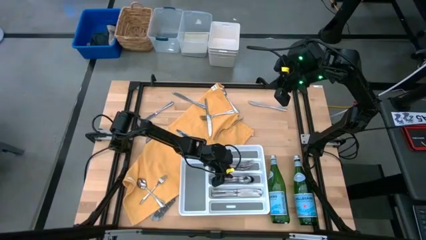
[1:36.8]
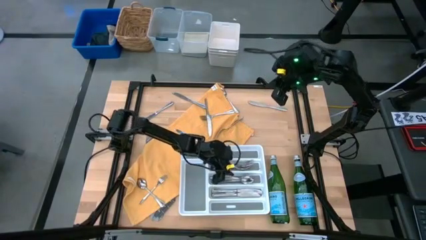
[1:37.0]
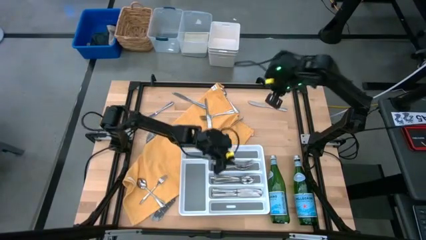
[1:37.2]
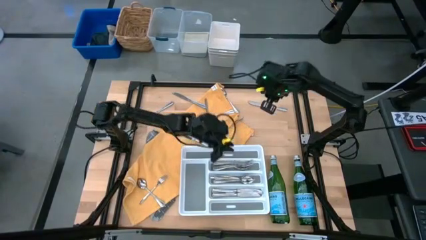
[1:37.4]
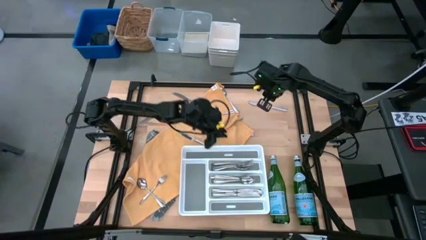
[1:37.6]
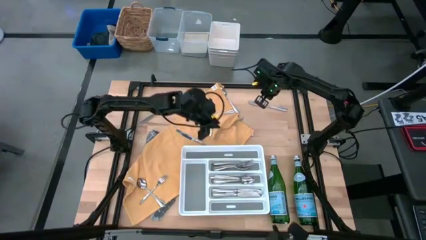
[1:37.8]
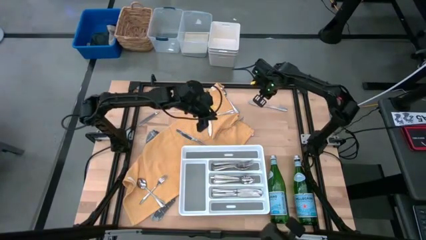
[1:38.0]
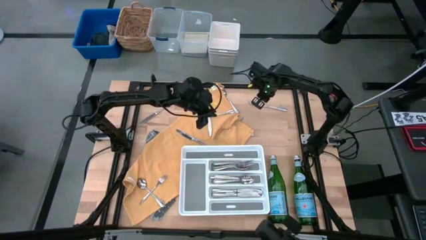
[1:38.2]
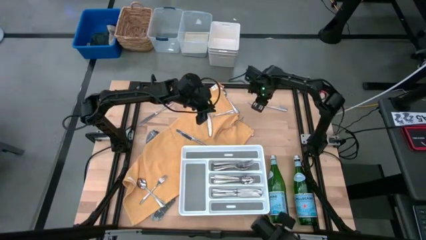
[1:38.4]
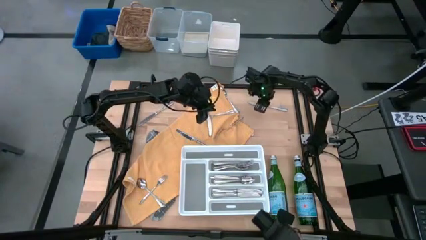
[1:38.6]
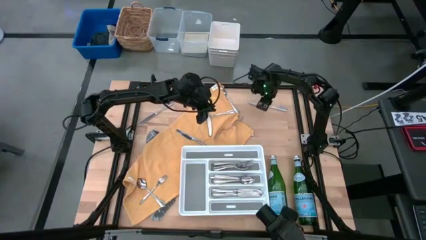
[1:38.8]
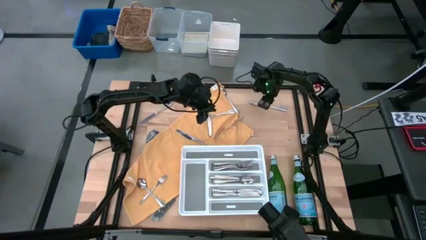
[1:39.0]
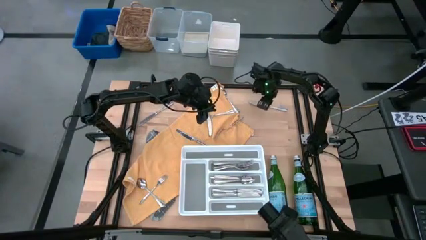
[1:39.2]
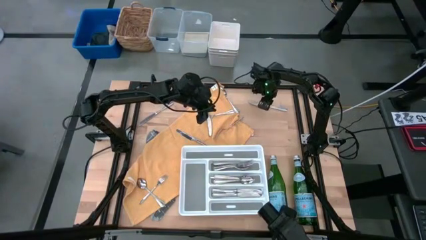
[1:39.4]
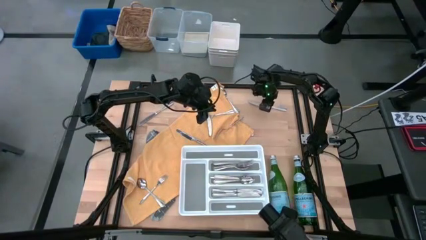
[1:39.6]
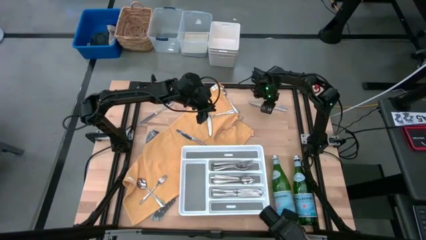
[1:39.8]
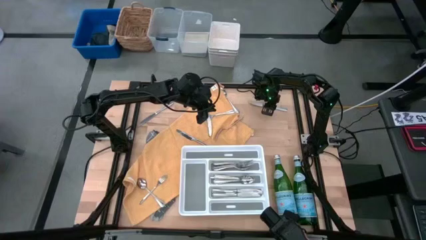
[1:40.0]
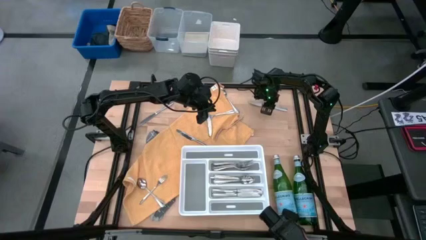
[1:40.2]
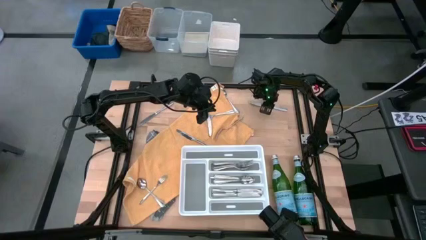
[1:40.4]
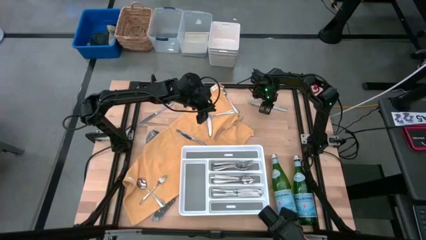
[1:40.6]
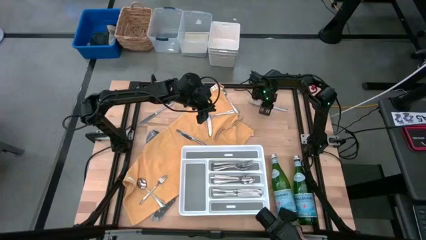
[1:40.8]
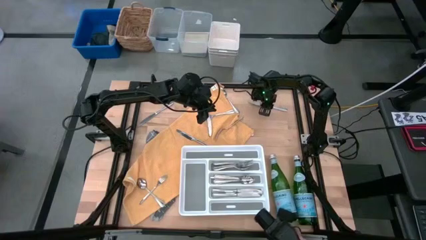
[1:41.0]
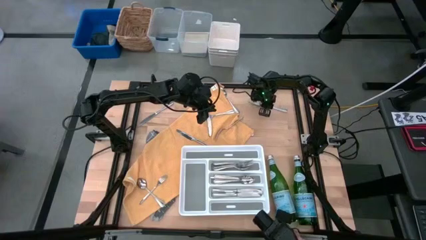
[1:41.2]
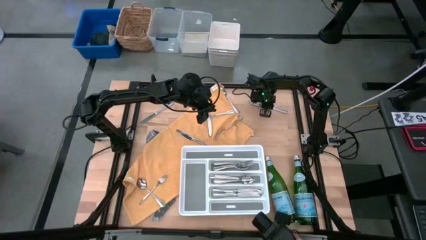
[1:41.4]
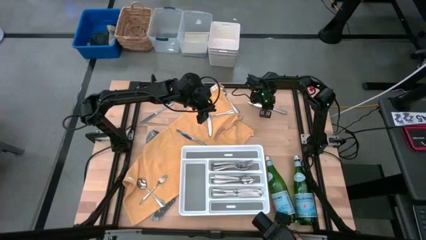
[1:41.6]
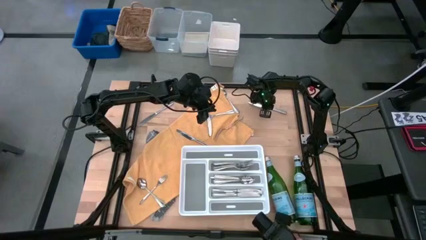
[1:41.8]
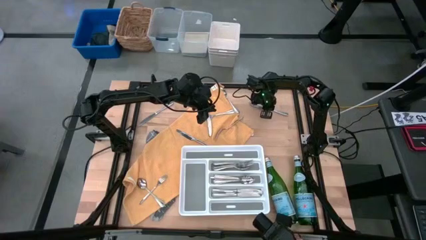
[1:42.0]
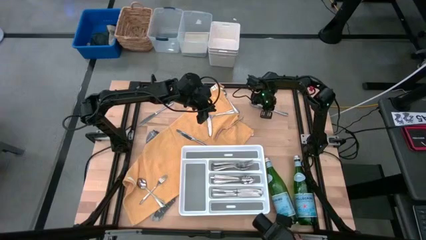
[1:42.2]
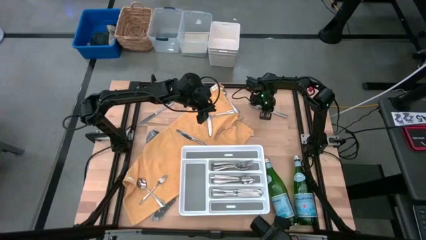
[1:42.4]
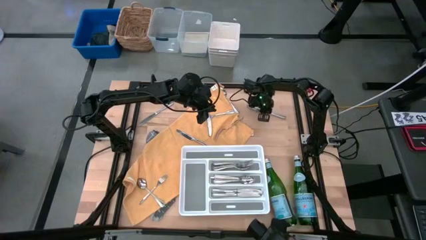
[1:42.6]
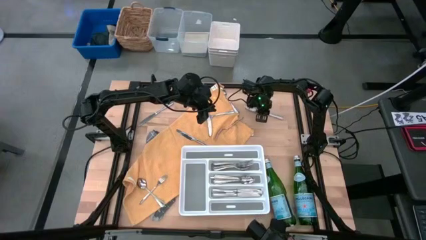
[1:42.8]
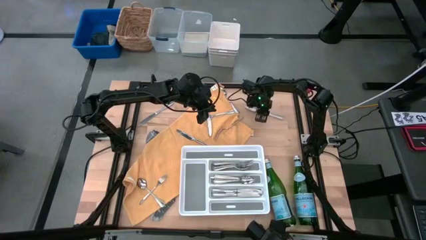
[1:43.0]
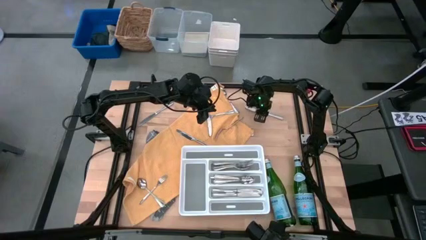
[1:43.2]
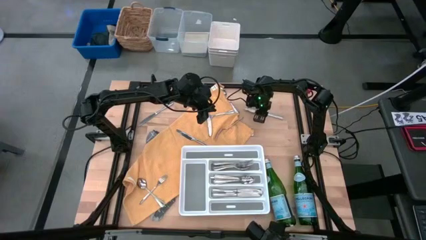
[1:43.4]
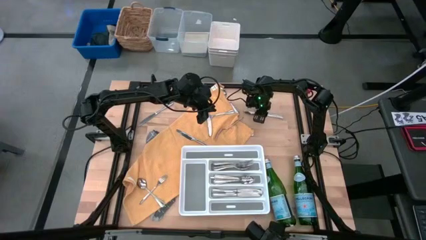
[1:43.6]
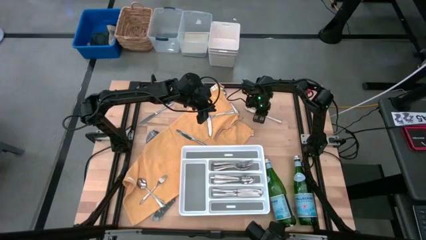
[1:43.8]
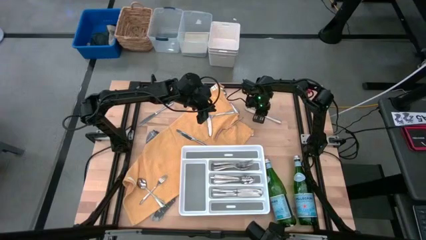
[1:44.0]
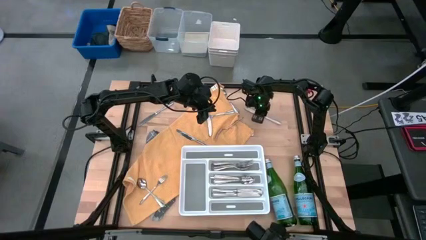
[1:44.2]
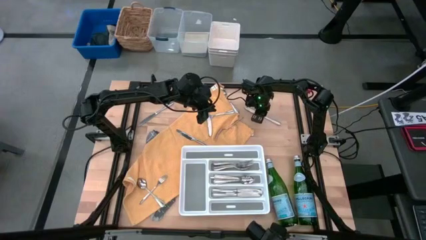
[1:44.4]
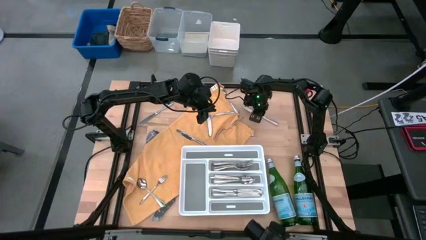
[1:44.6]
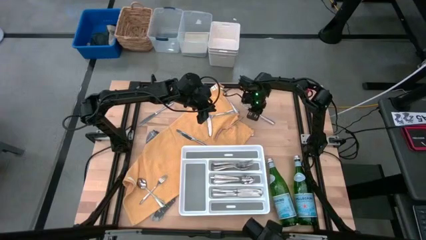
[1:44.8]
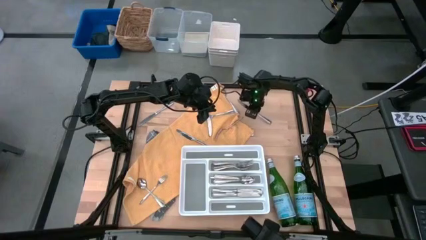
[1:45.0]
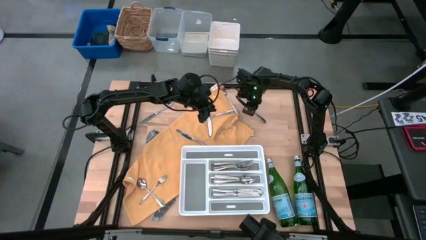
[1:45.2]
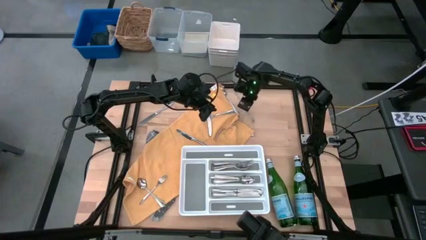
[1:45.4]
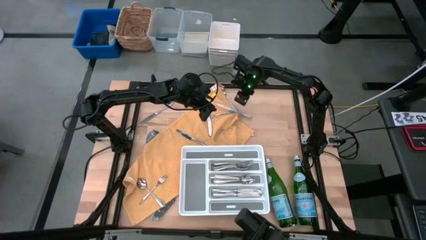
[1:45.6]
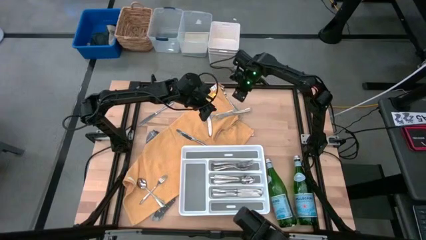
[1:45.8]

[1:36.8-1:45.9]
Task: Sort silverware
Put the silver table knife into the white silverware tray

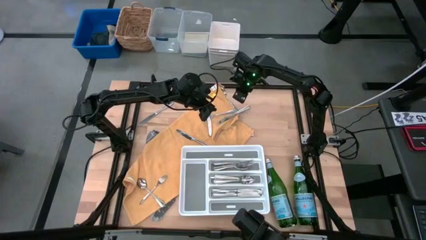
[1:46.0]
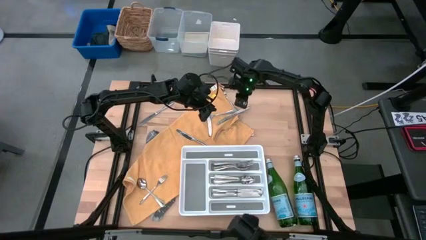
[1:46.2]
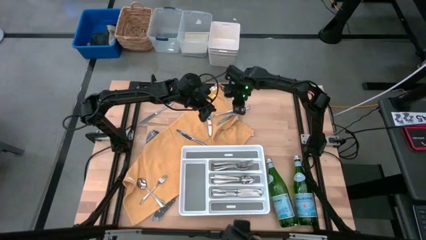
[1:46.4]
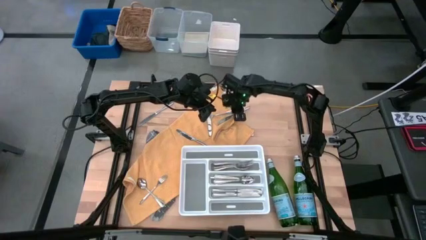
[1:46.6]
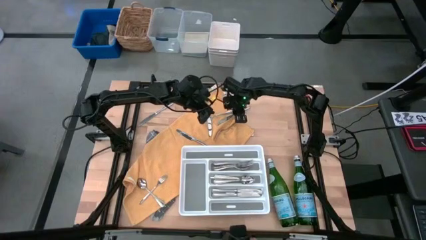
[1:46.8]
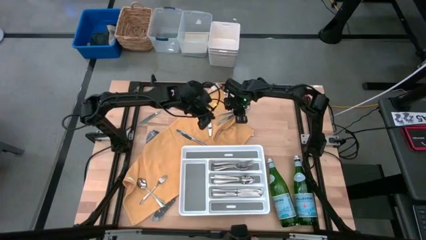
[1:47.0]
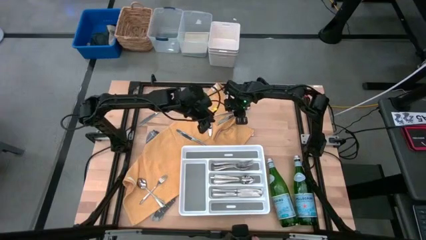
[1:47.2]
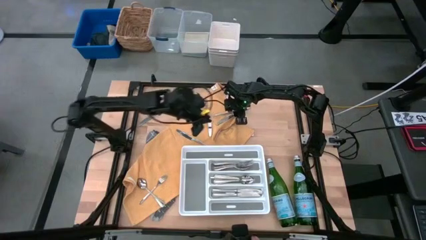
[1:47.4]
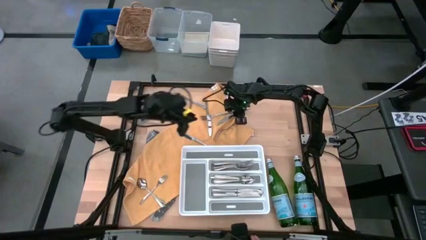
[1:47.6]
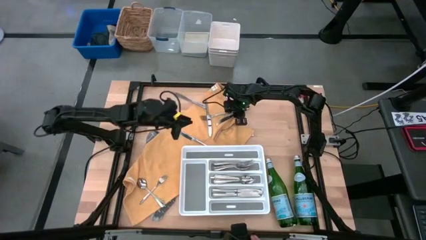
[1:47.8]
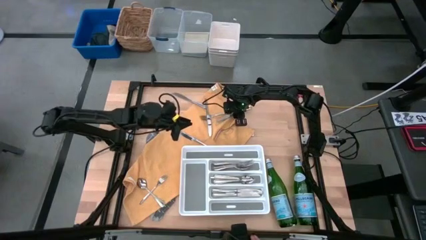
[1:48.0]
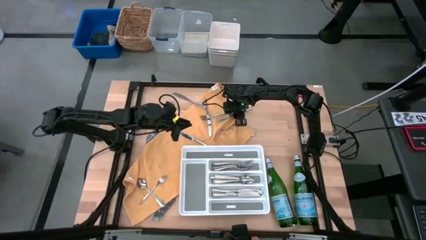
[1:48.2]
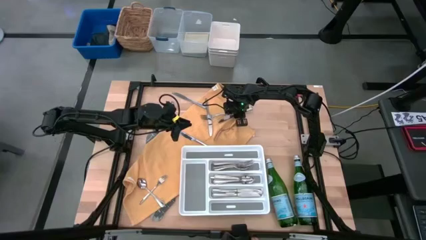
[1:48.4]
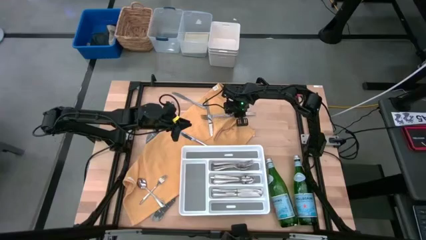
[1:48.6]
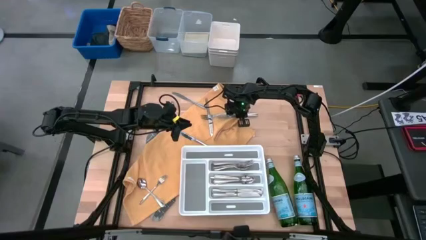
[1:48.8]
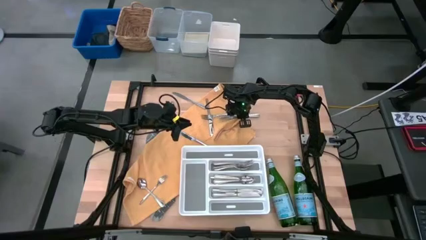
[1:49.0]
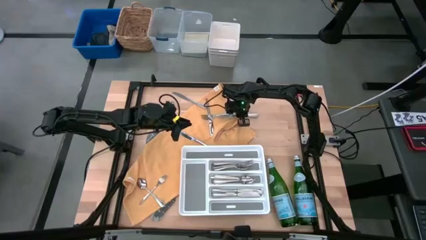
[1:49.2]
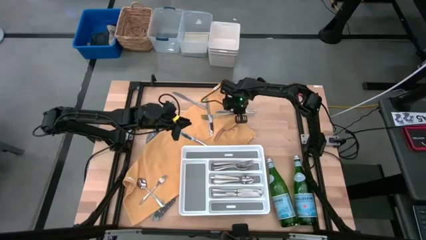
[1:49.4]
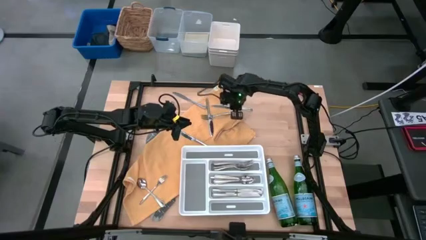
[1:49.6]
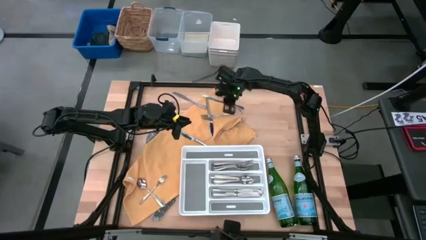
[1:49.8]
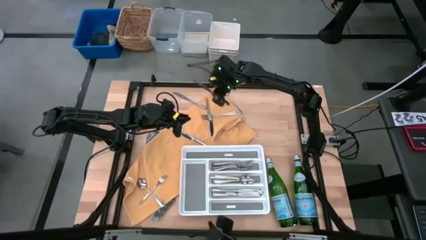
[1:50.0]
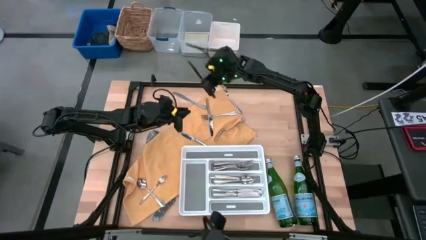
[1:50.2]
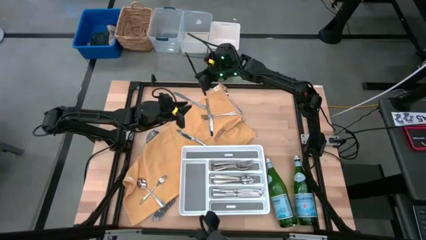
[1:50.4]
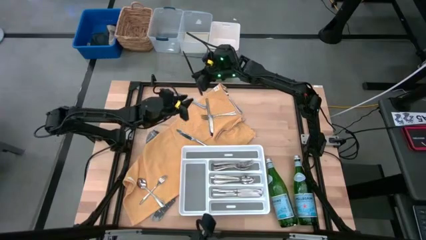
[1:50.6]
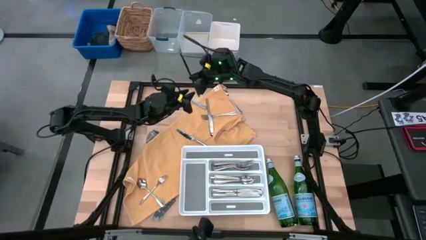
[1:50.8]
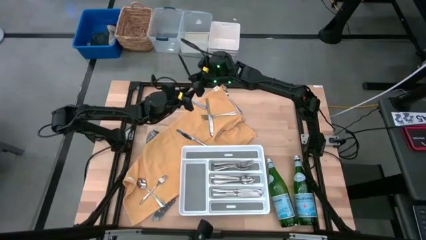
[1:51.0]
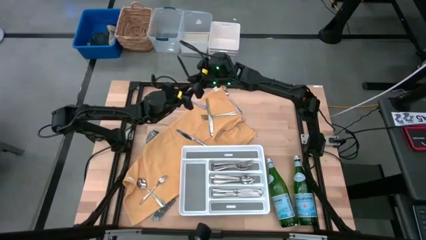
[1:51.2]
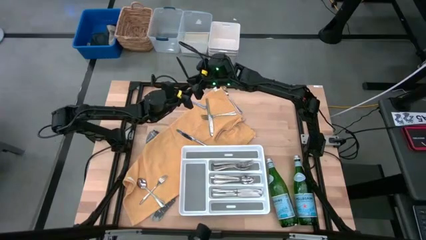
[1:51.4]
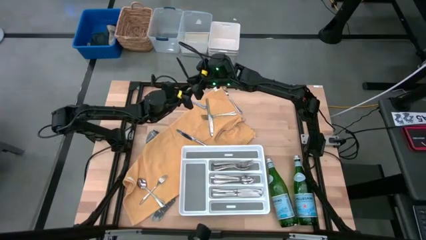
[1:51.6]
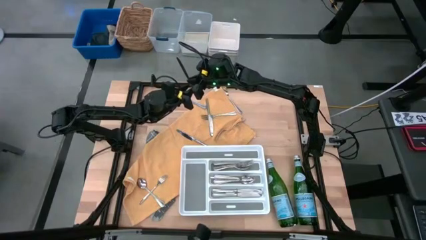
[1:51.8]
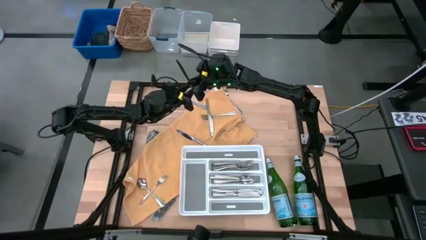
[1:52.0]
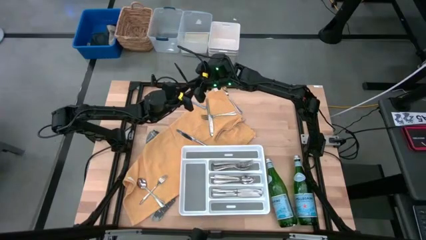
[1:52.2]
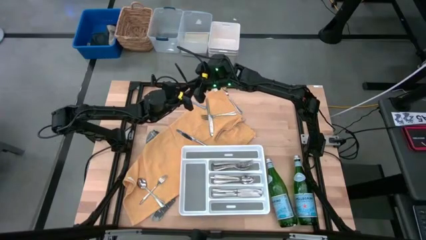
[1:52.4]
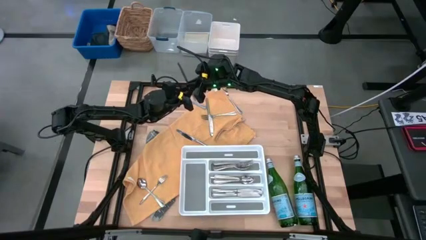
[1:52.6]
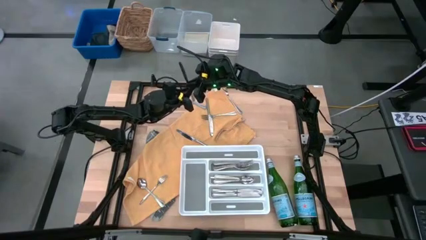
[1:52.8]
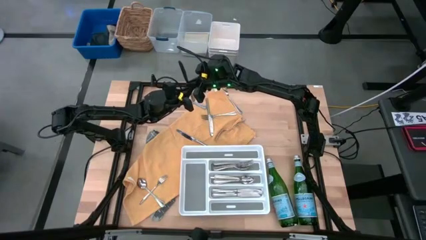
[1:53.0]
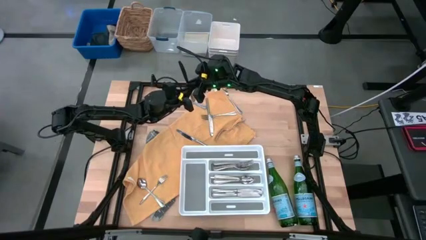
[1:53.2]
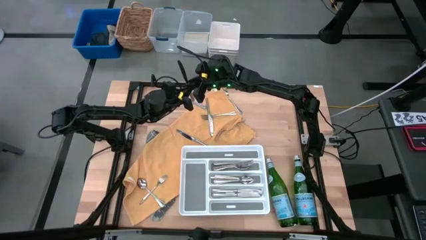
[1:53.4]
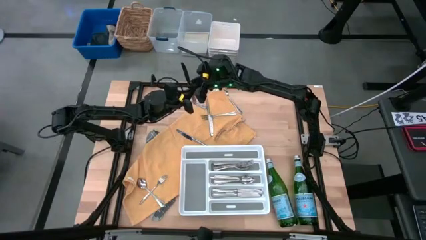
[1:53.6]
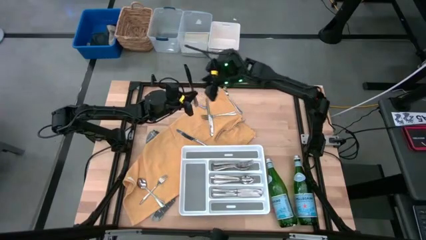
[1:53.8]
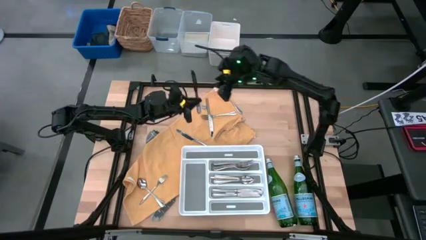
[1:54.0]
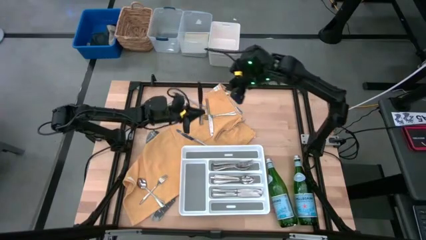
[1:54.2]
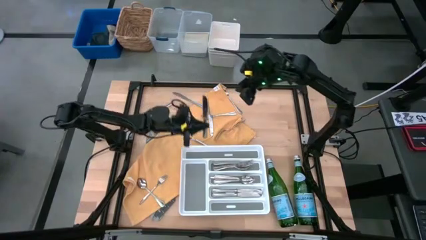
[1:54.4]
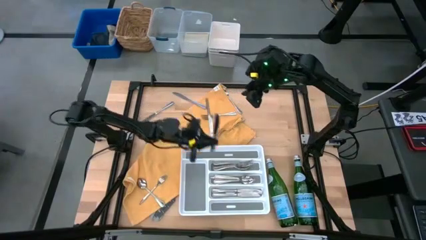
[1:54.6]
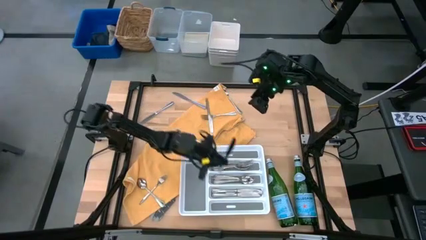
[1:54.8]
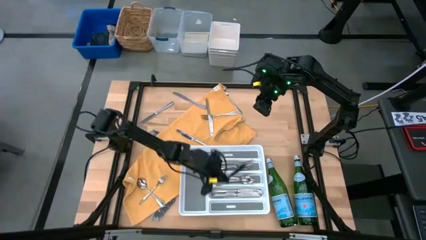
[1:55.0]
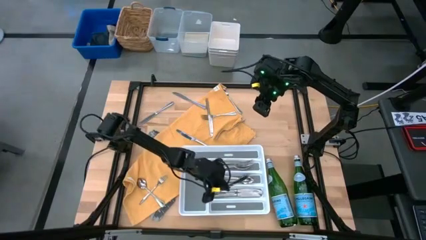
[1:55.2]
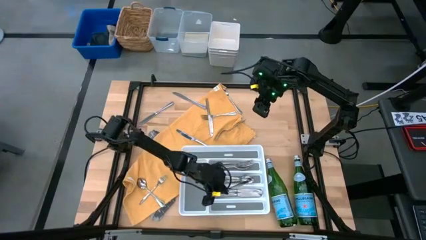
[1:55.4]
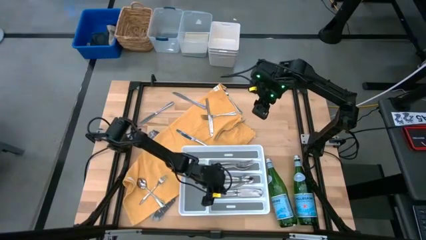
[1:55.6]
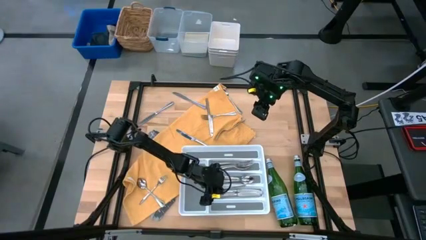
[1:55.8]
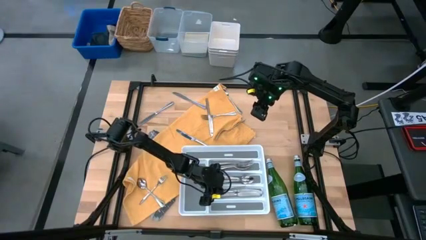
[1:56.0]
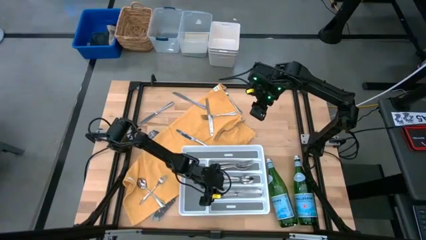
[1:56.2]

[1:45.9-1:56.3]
Put the silver table knife into the white silverware tray
